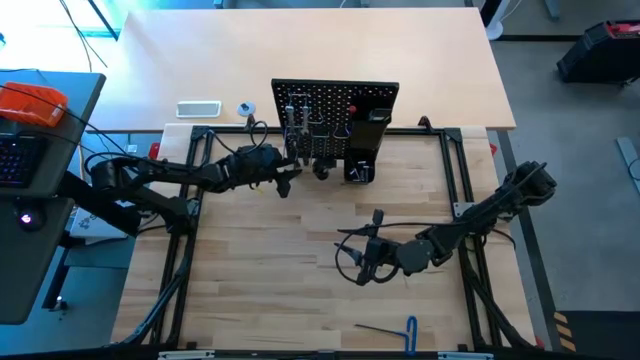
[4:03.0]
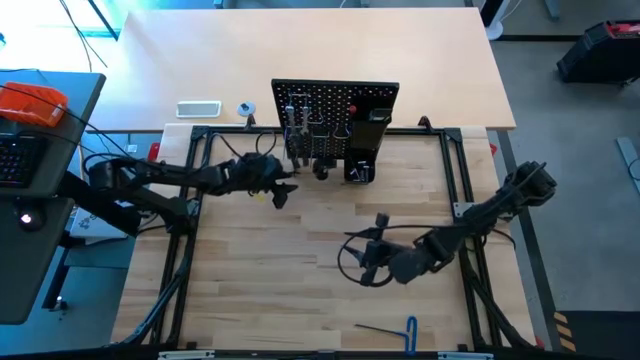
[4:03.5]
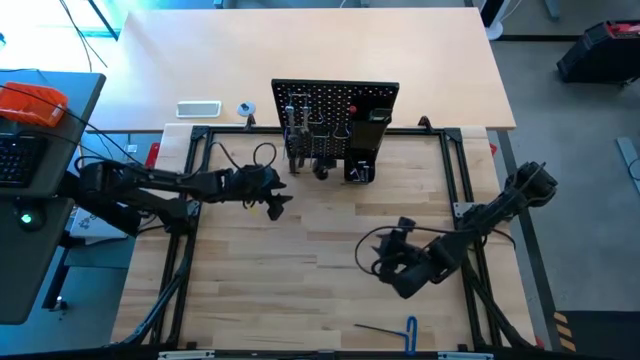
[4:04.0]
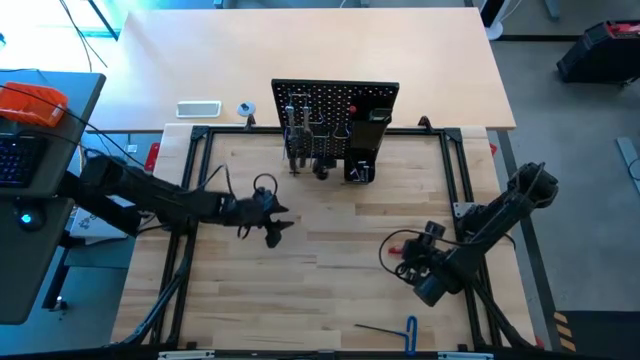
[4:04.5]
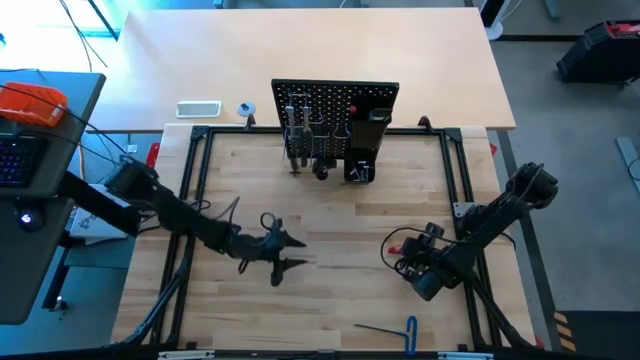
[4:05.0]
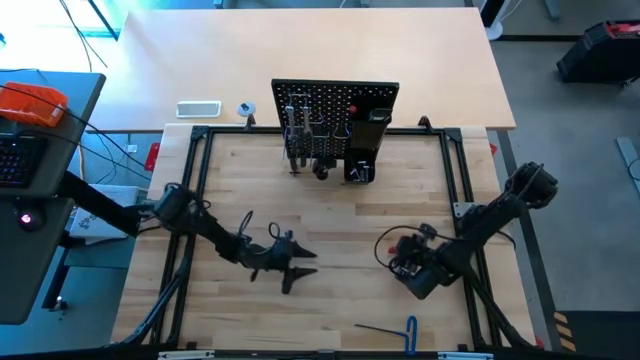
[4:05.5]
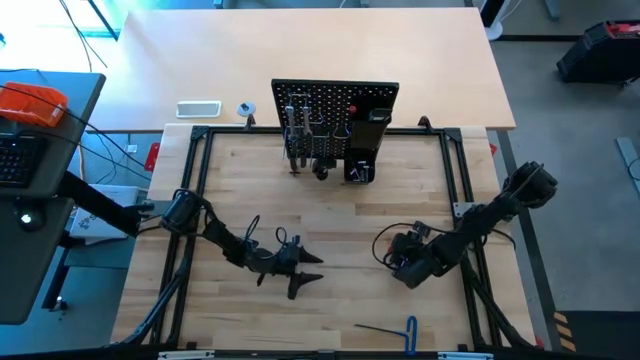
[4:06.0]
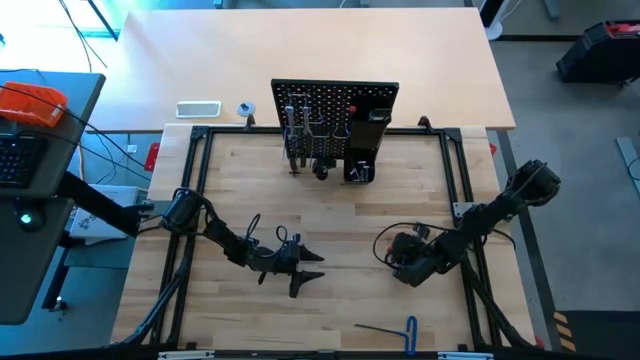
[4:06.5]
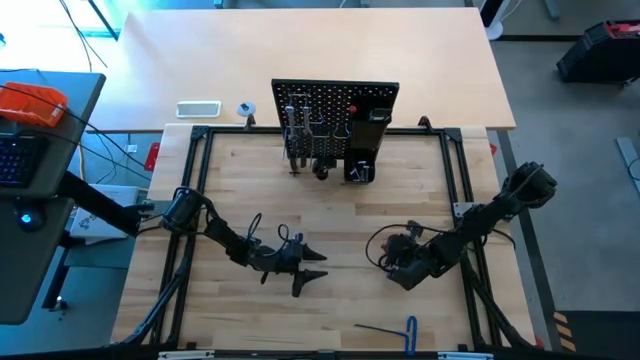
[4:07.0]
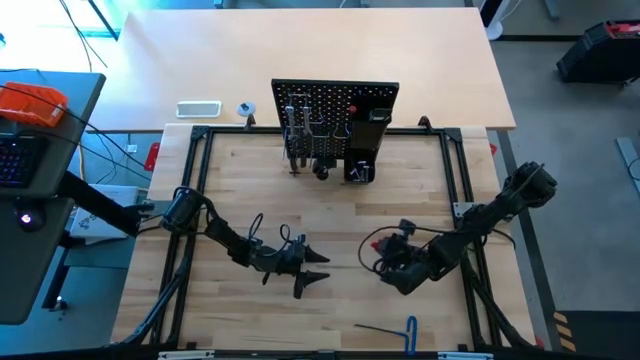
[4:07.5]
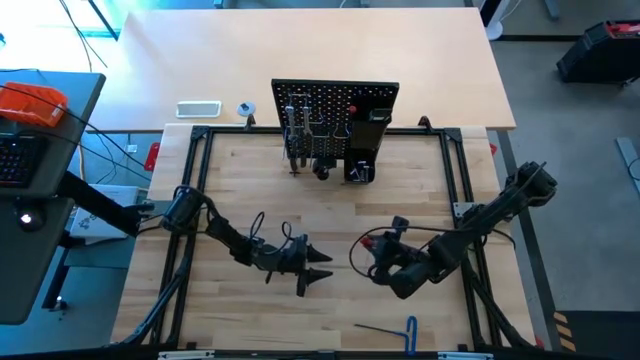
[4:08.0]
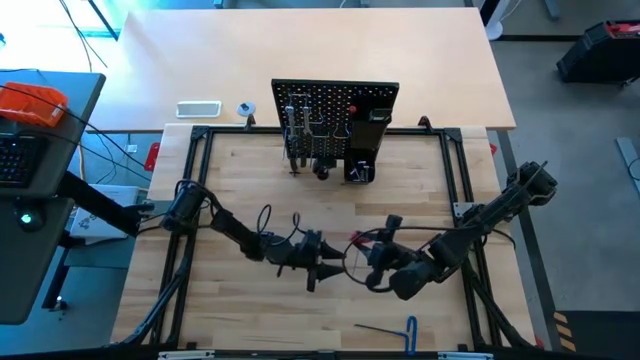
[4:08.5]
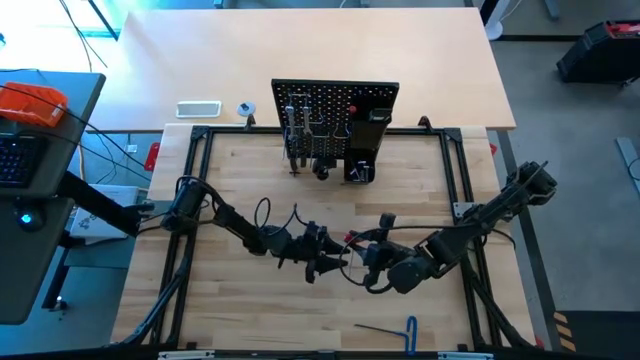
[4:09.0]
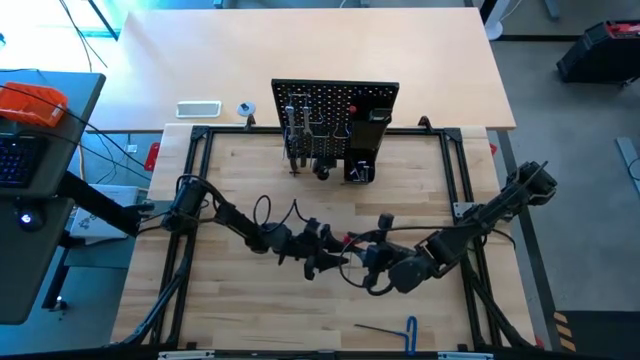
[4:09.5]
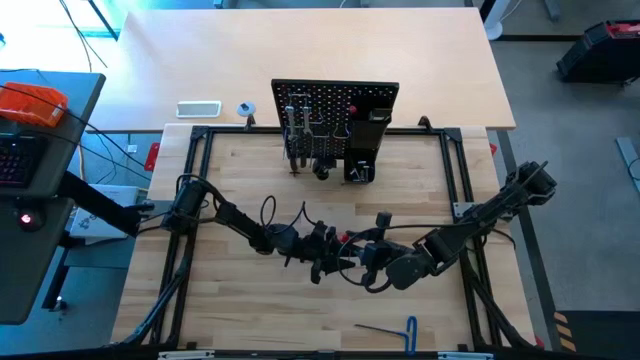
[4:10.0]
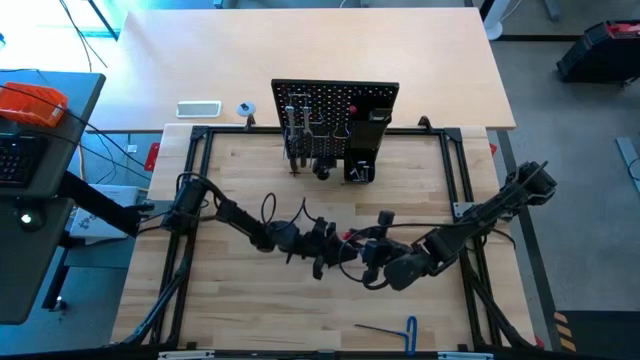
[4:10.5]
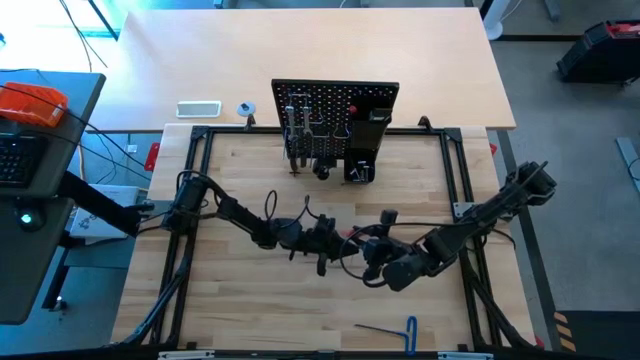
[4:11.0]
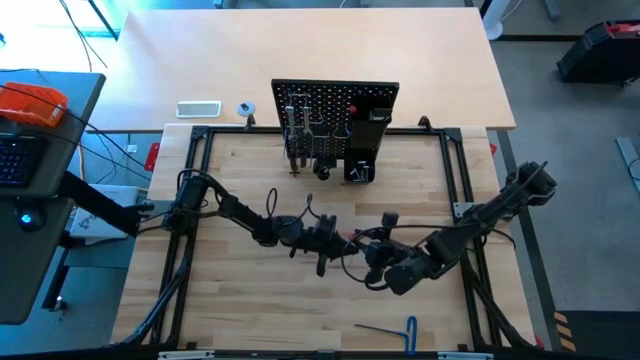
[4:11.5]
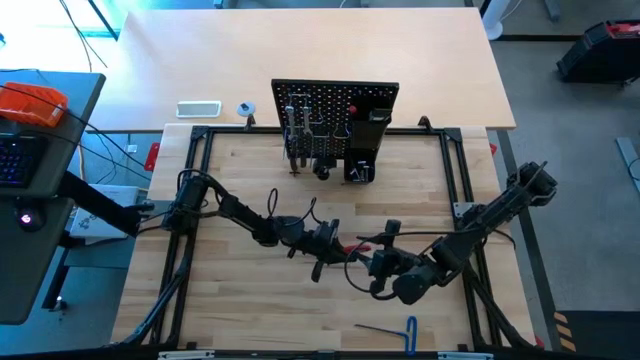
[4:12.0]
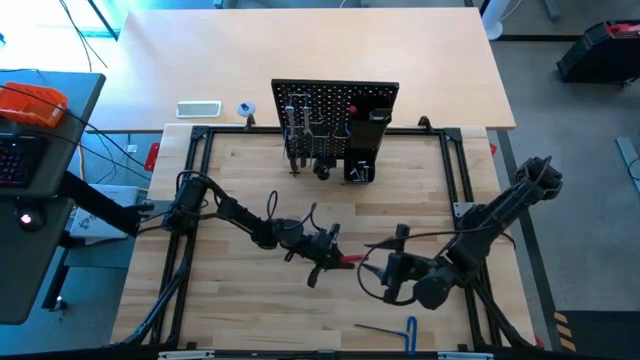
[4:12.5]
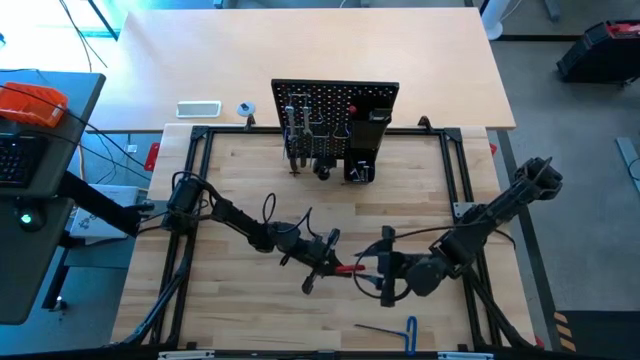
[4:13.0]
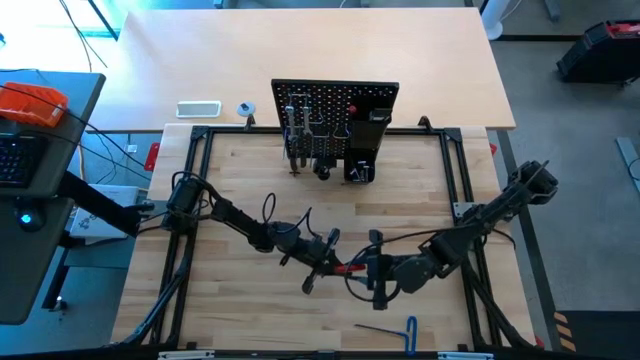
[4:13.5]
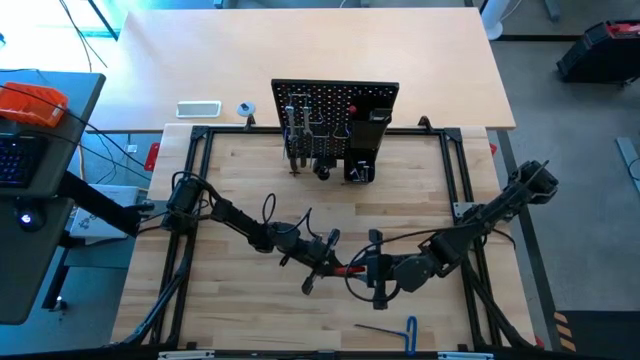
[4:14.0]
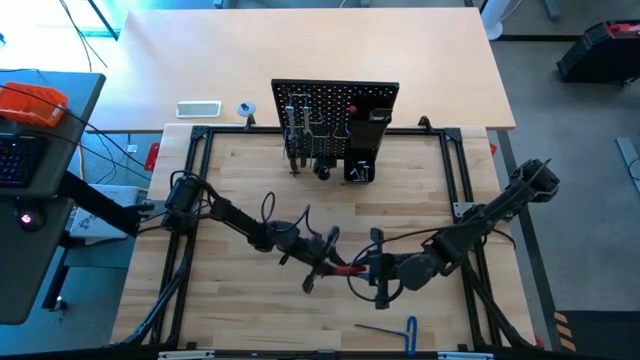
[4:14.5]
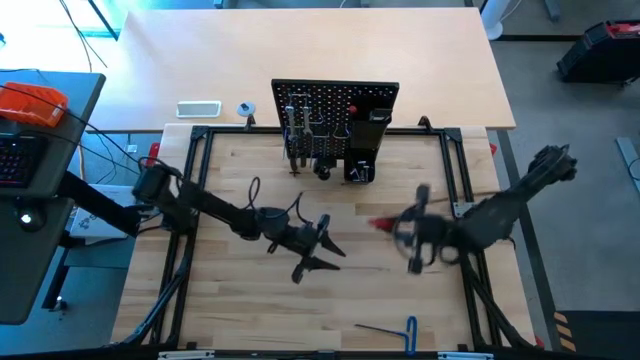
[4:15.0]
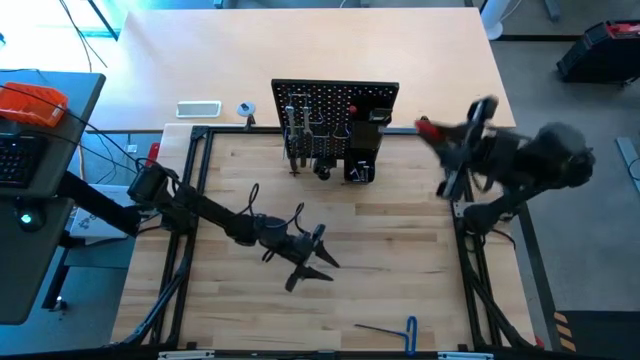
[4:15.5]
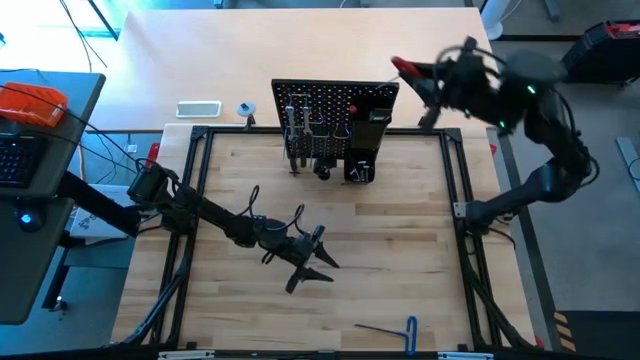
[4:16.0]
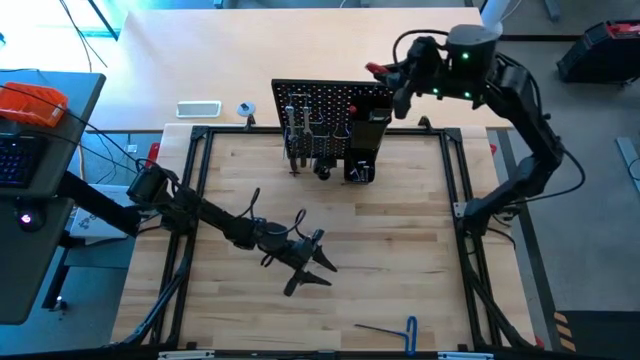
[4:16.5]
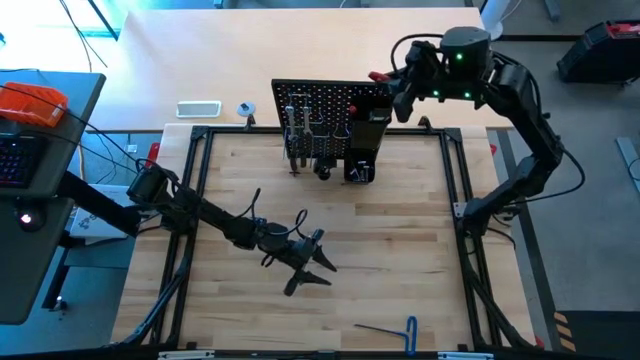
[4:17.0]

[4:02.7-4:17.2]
Task: Hang tools onto peg board
Put the red allen wrench into the top peg board bin

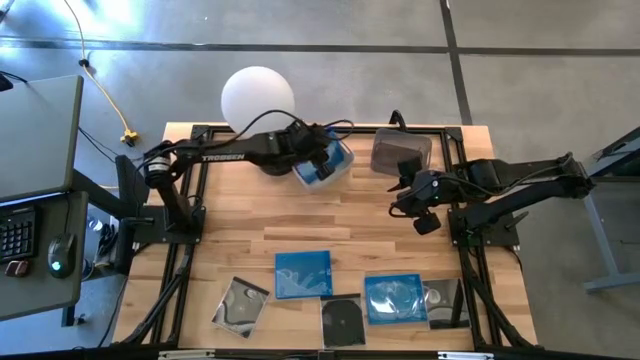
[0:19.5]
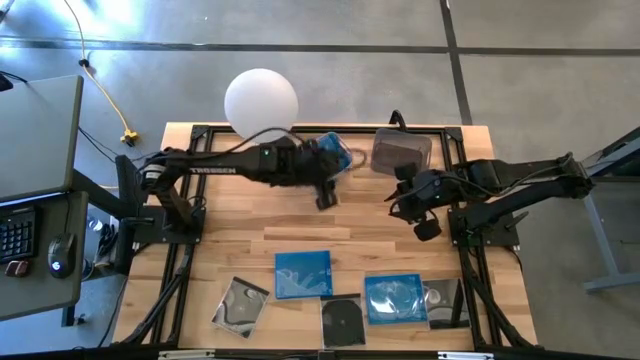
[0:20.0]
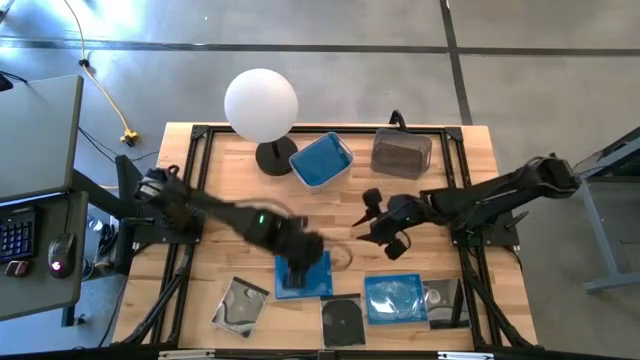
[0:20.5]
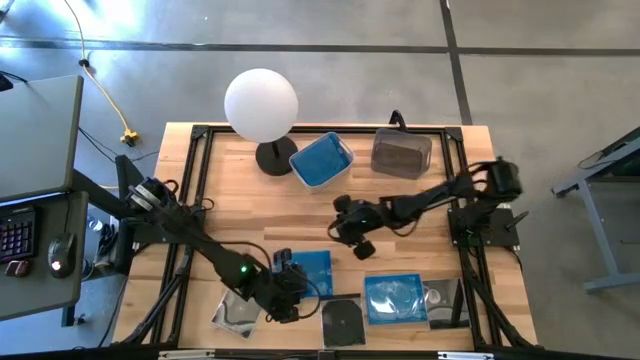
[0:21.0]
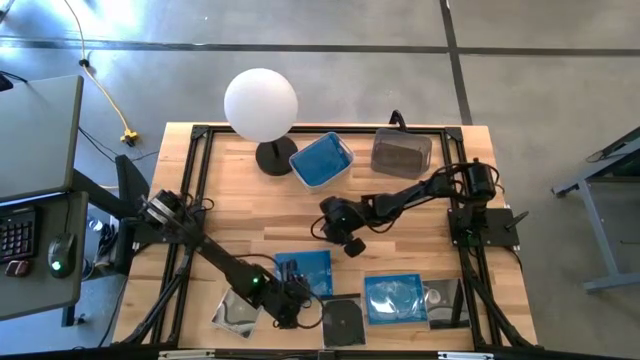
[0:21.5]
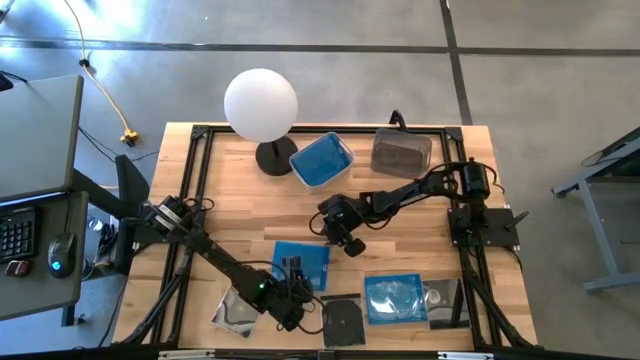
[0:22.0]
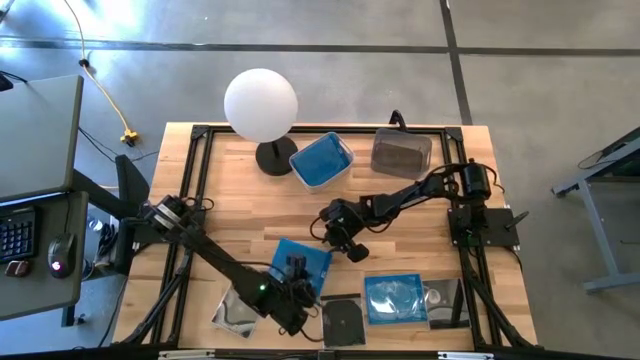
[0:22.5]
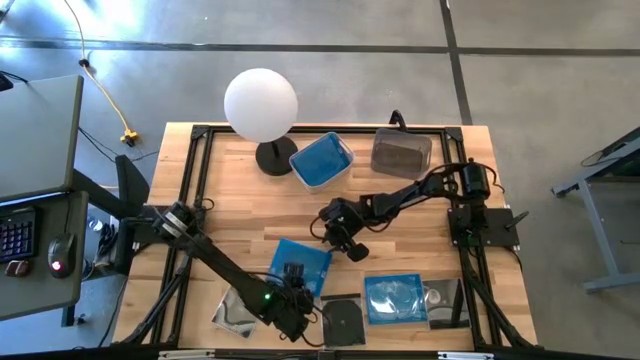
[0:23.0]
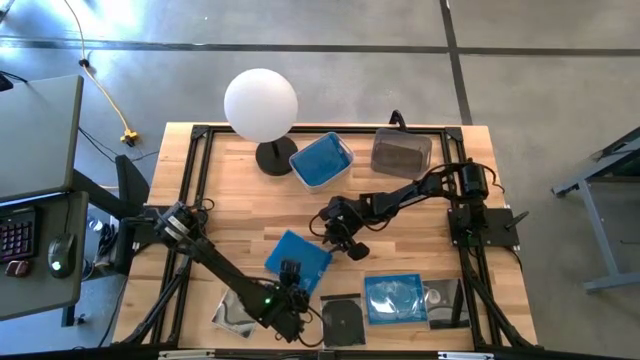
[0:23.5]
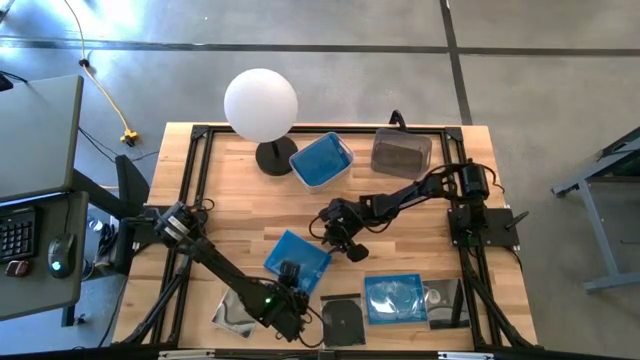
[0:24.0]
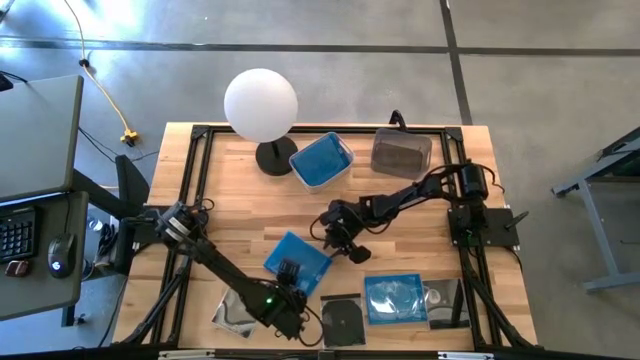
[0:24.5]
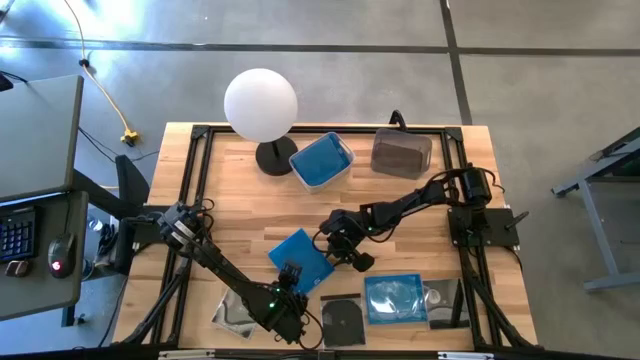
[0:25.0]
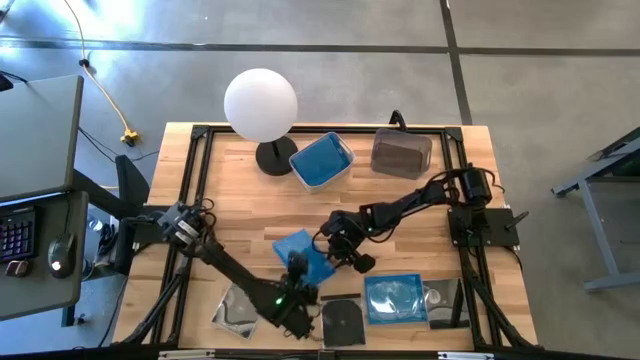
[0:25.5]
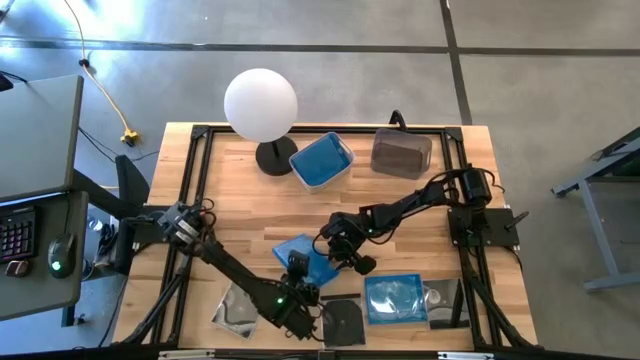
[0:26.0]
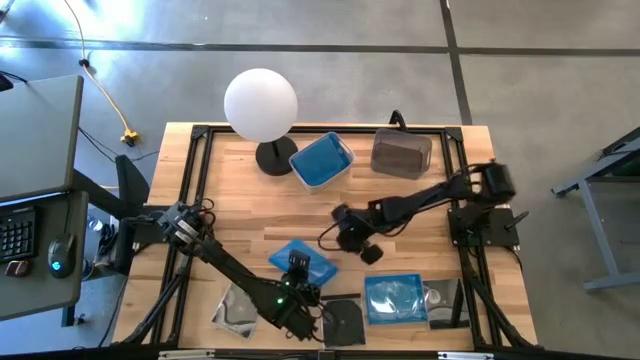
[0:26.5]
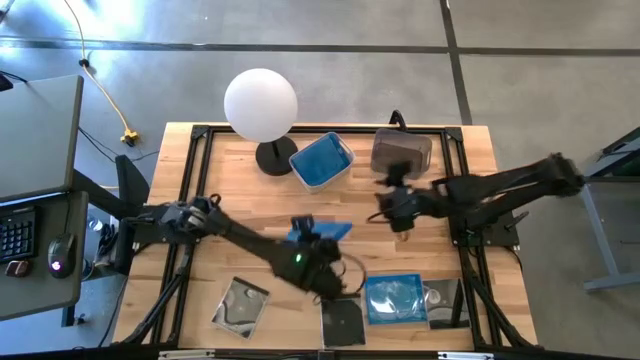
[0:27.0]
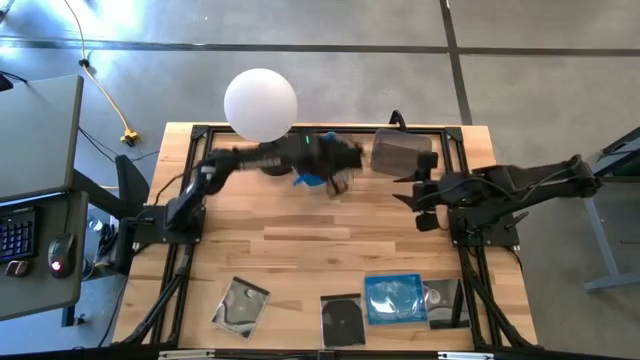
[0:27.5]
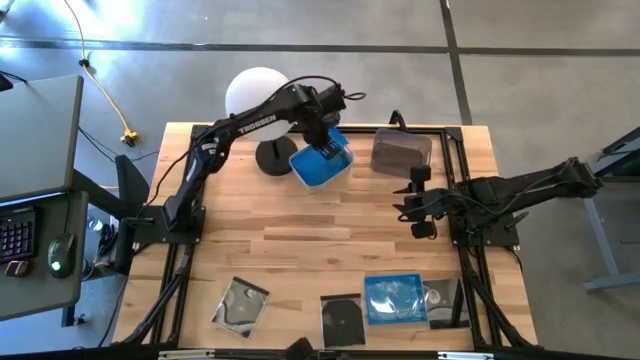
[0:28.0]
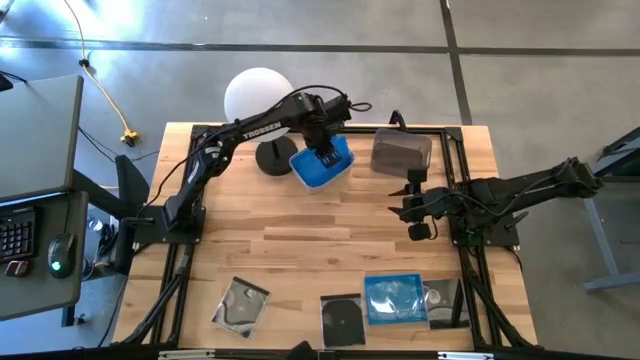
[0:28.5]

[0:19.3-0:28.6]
Task: Pick & place jewel cases by type
Put the left blue CD case into the gray bin
